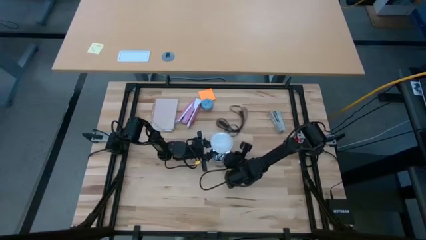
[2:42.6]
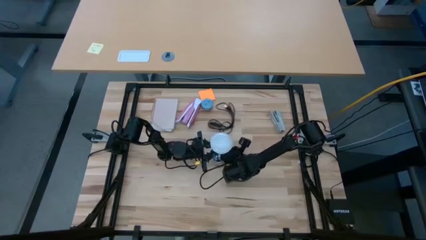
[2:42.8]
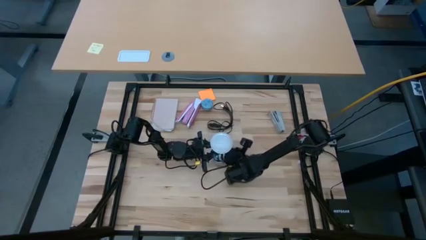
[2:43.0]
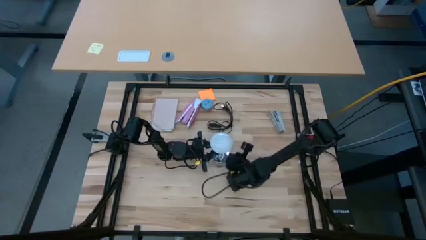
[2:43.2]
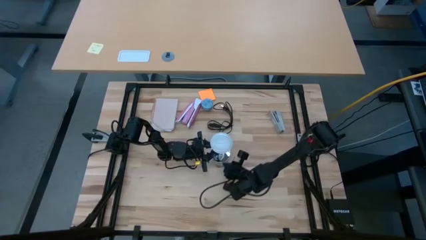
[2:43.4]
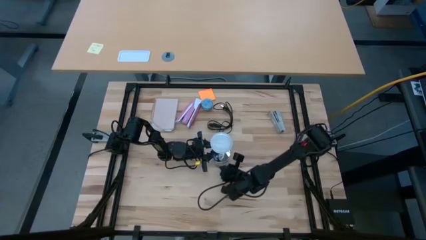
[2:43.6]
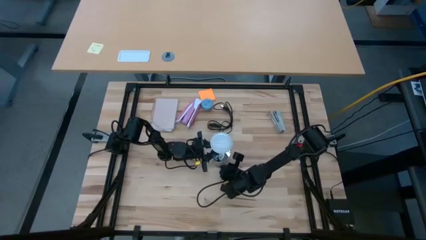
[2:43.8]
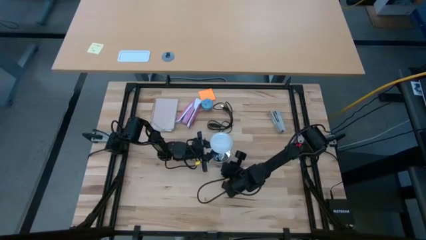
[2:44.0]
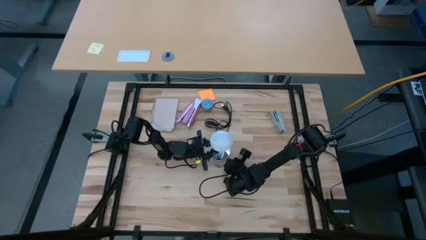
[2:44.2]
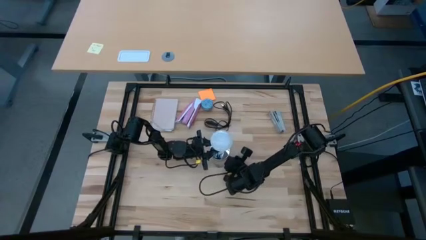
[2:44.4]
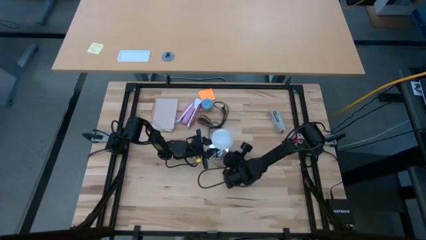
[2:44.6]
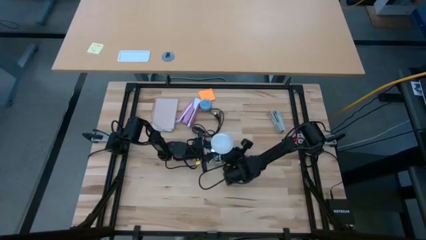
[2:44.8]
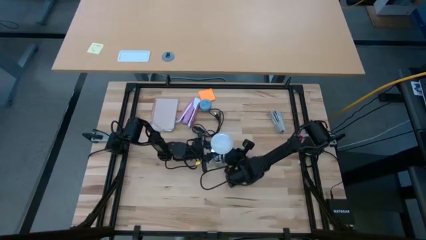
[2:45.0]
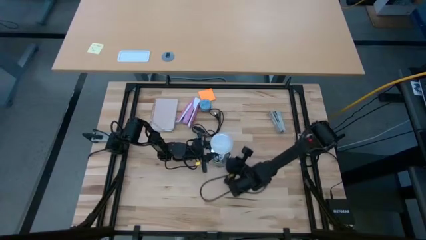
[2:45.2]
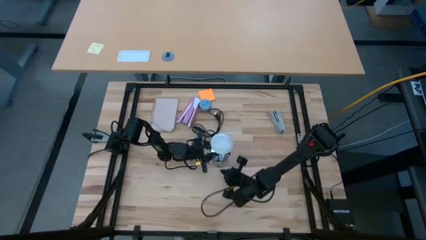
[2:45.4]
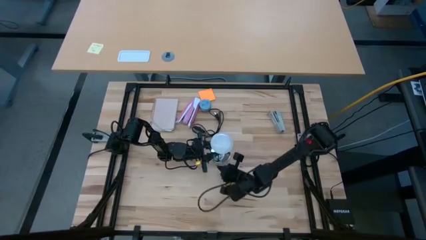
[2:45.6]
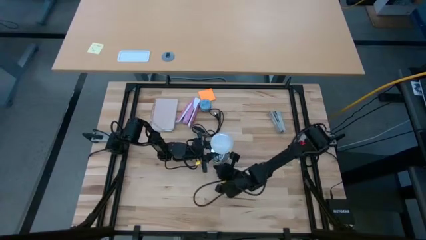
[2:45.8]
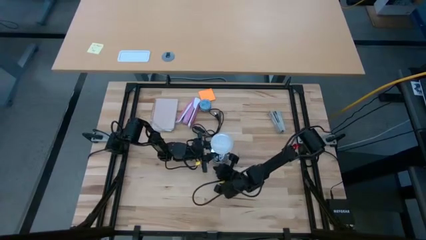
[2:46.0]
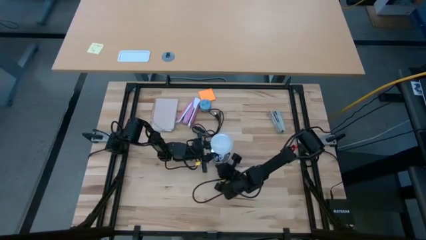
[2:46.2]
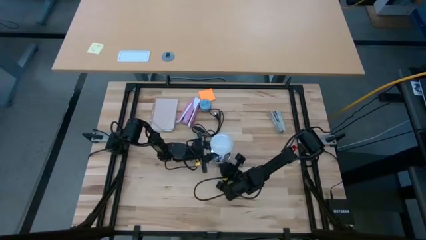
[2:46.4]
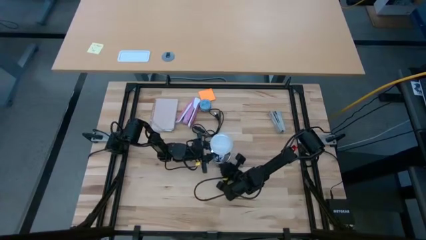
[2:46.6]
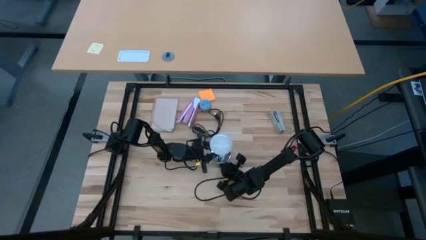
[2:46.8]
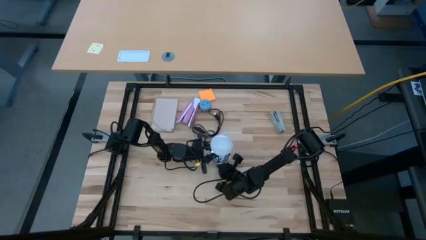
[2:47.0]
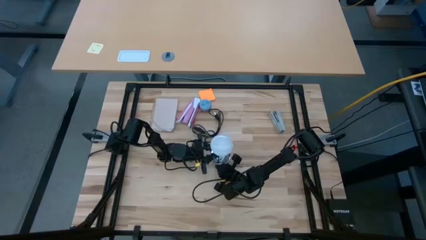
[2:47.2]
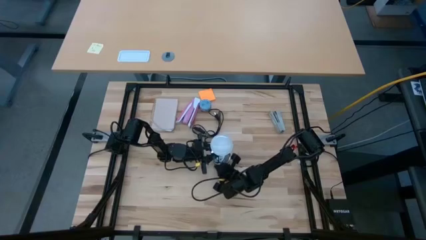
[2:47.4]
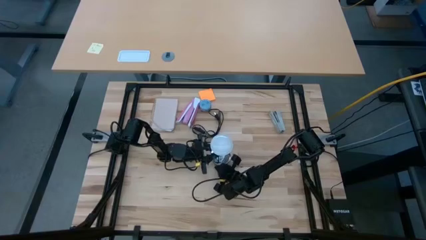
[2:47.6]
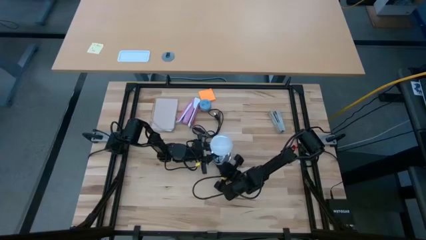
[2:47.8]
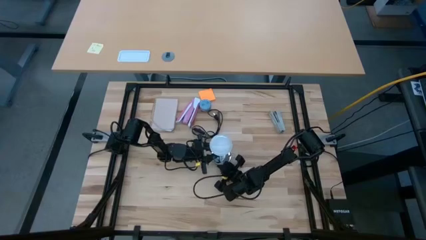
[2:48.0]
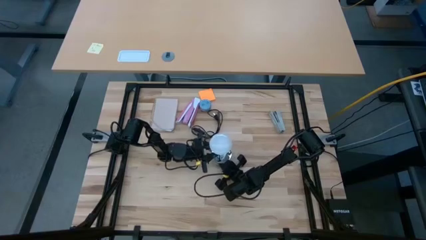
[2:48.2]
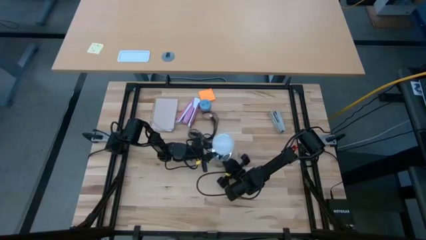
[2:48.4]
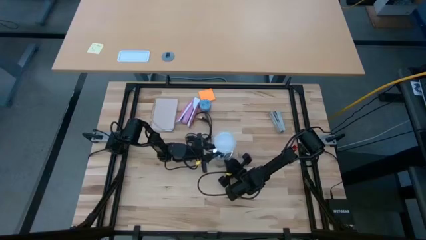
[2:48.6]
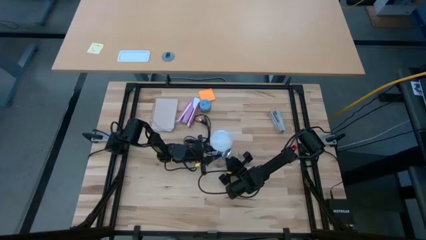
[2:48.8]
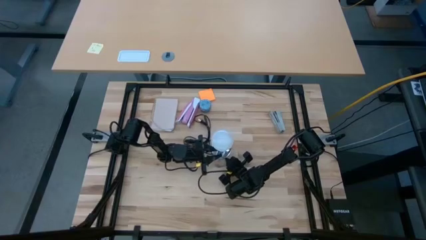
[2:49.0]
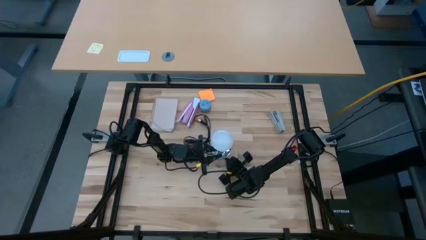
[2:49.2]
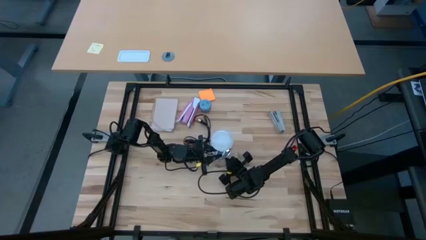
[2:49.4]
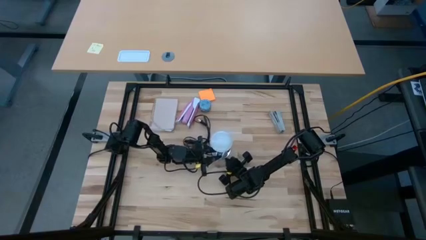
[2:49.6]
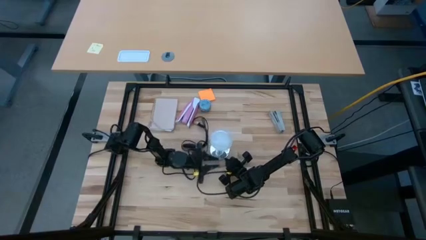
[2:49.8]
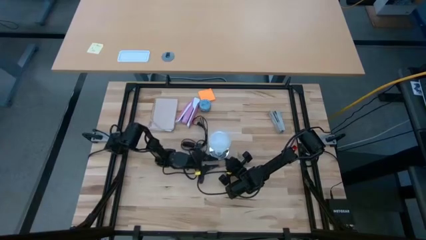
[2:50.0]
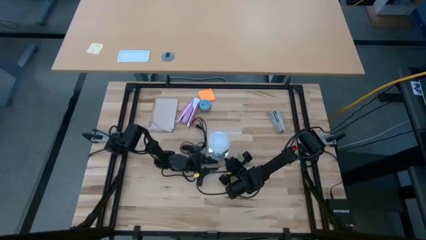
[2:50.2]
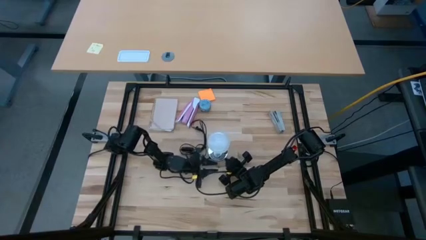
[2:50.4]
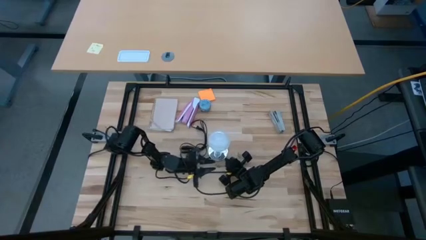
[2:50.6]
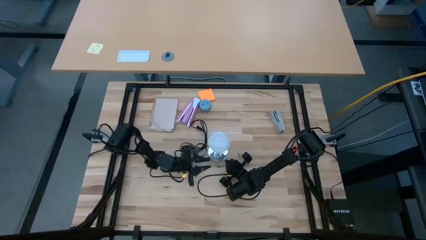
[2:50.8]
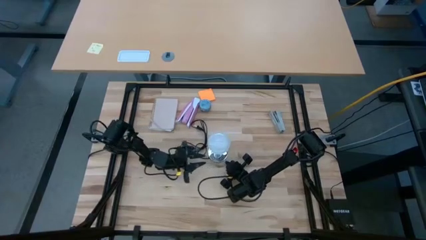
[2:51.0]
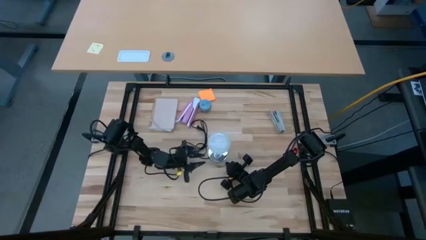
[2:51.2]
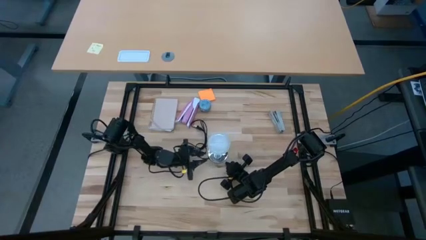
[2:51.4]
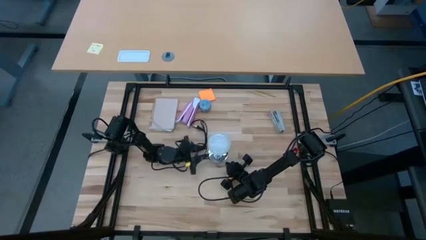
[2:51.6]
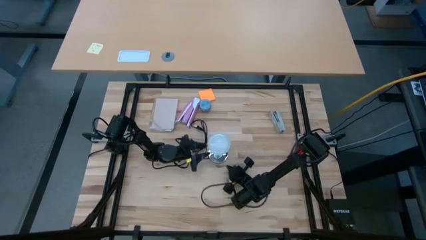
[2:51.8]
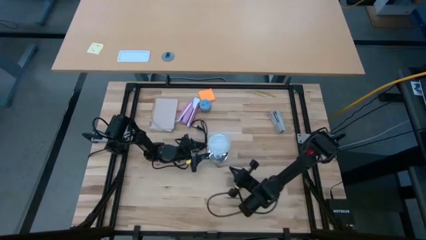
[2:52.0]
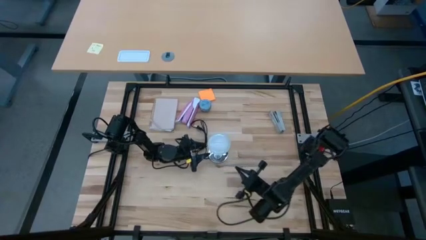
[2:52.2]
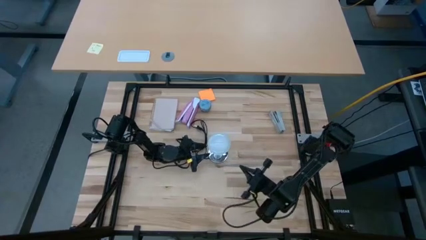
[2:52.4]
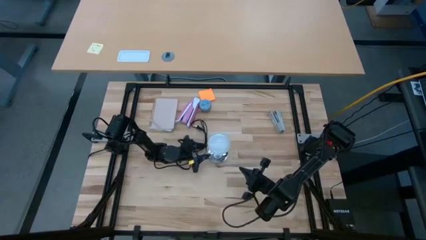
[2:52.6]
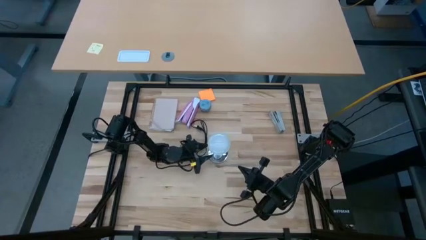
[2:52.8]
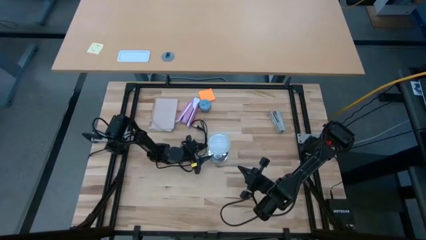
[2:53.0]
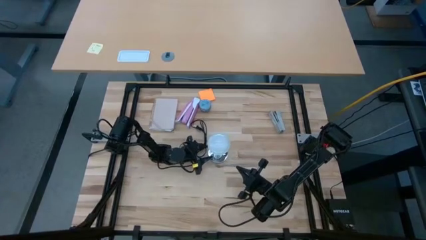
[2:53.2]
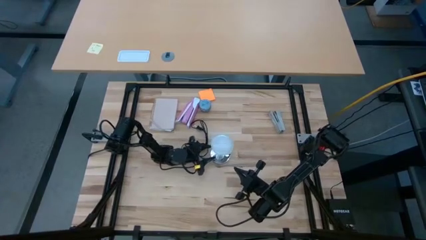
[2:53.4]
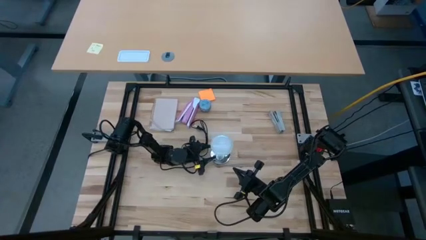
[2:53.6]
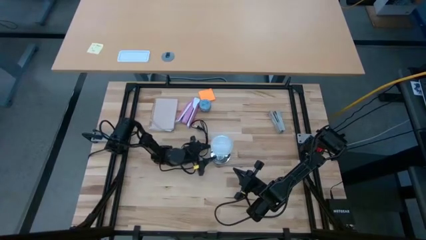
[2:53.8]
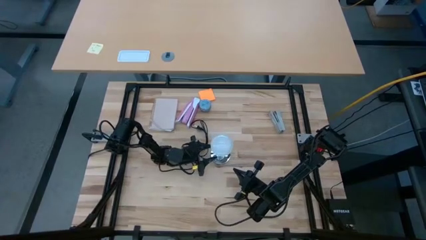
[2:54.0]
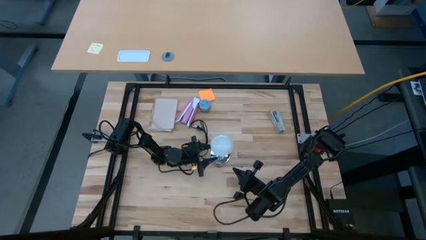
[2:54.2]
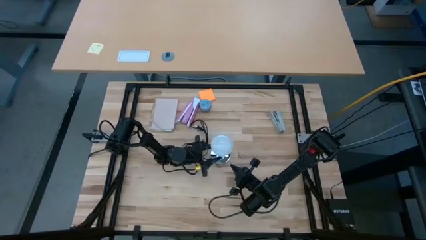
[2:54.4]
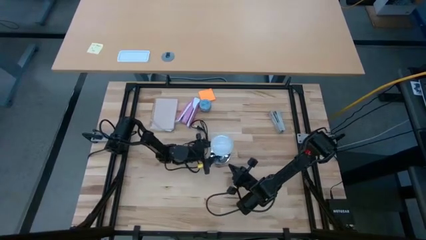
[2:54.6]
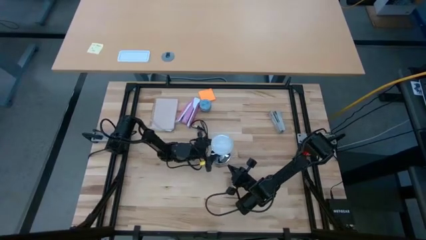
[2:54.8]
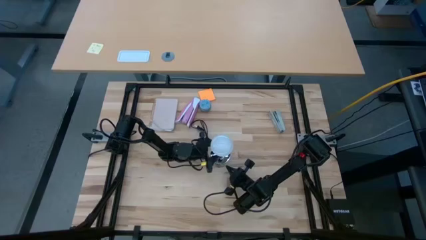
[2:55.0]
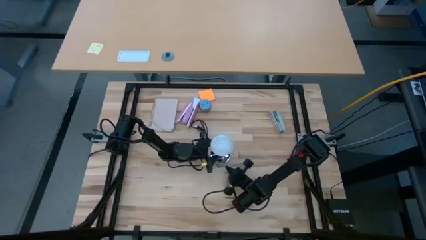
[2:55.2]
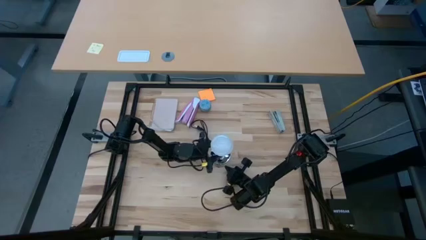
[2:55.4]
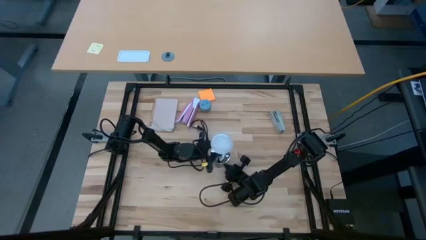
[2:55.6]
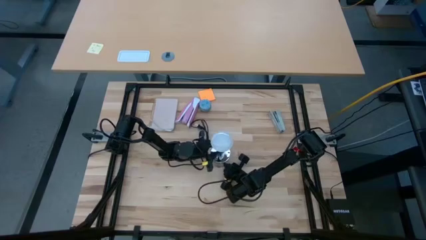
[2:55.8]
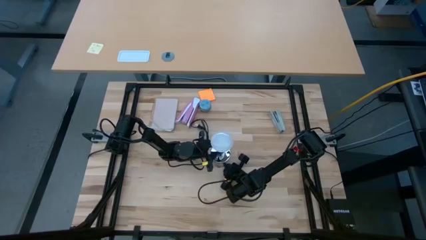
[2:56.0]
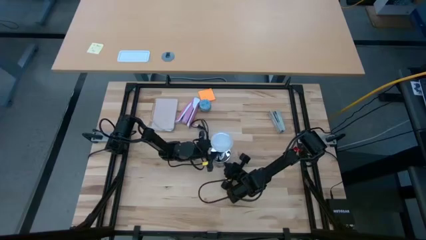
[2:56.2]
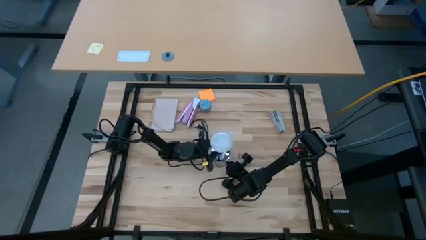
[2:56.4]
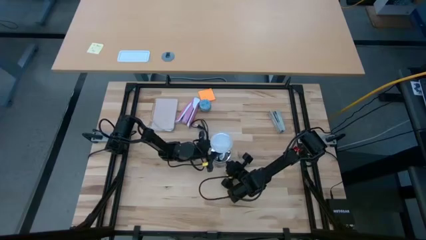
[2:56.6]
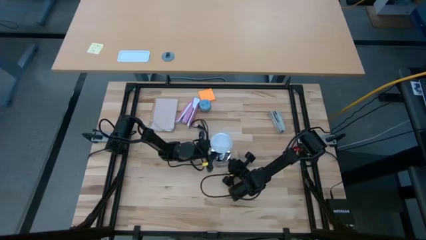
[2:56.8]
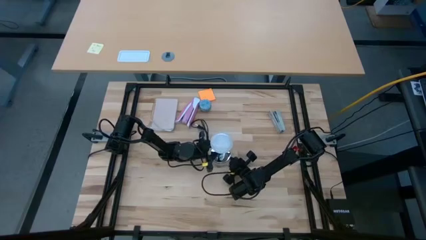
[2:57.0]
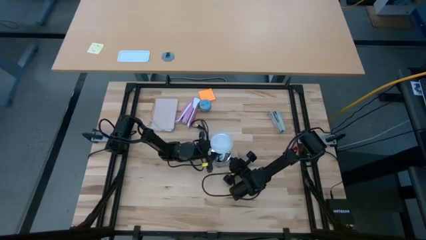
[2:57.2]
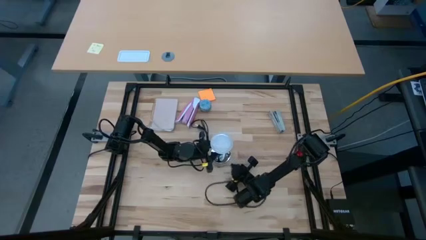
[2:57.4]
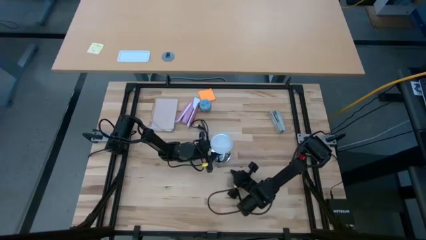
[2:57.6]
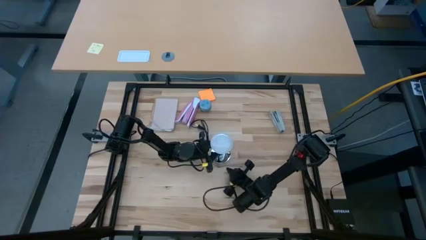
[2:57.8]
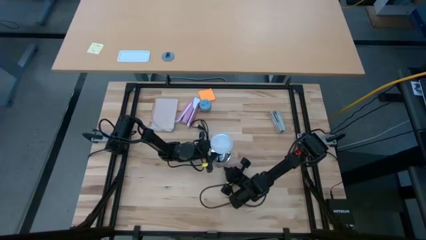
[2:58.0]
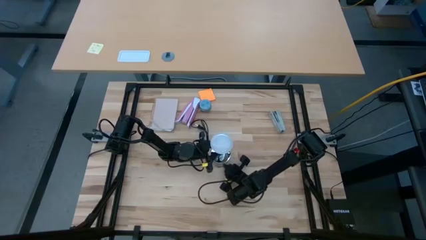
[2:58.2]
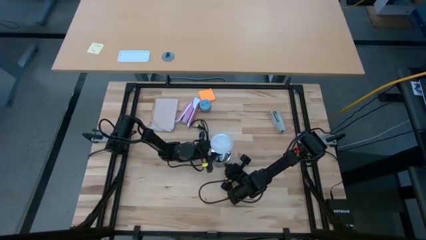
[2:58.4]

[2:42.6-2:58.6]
Task: Screw lightbulb
Insert the lightbulb into the lamp
